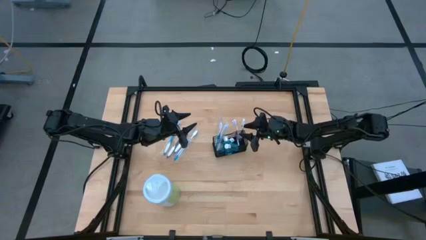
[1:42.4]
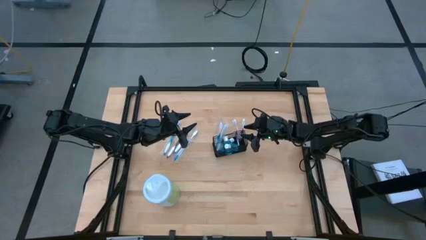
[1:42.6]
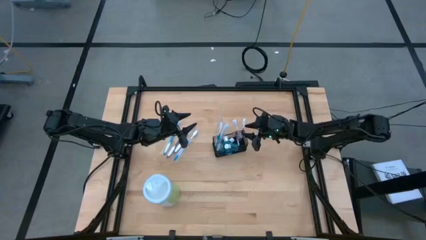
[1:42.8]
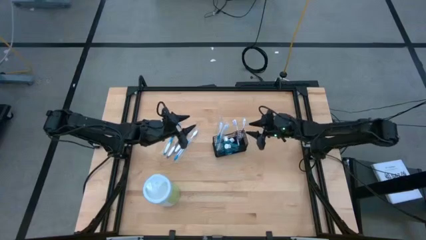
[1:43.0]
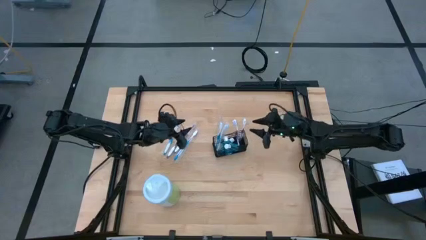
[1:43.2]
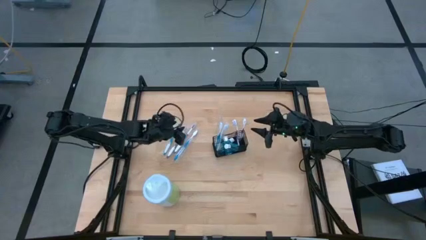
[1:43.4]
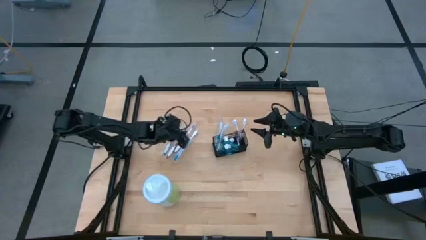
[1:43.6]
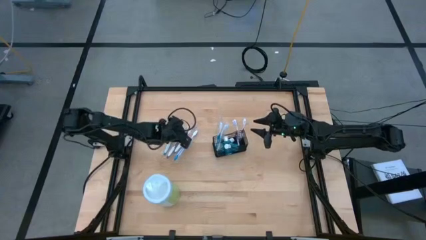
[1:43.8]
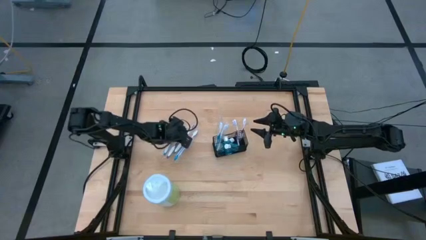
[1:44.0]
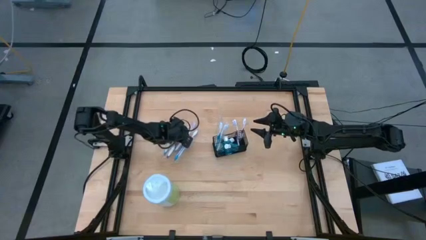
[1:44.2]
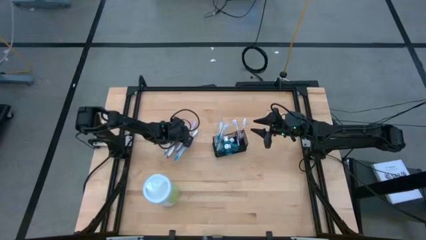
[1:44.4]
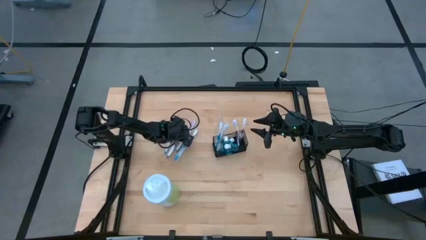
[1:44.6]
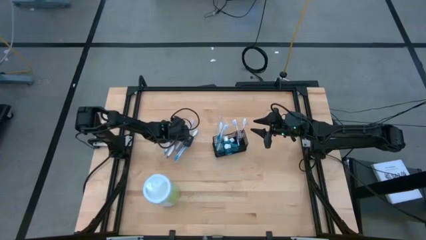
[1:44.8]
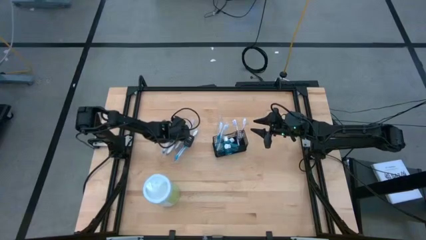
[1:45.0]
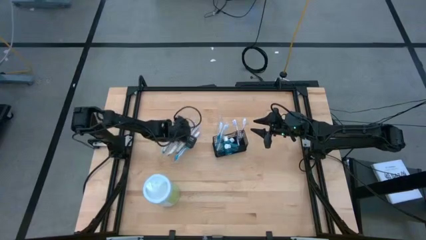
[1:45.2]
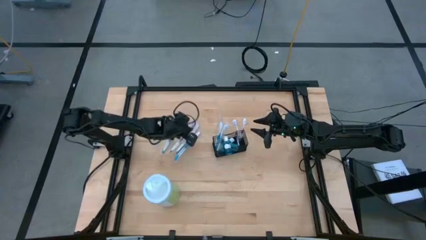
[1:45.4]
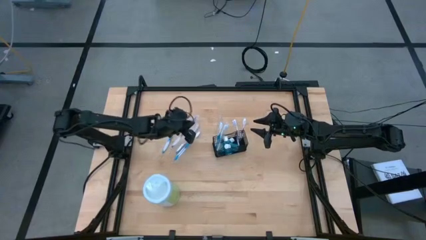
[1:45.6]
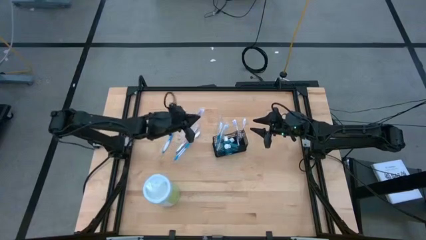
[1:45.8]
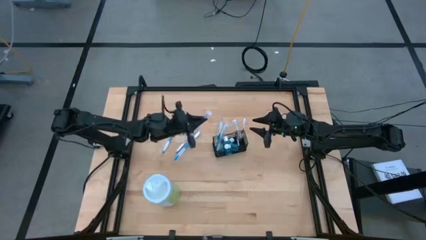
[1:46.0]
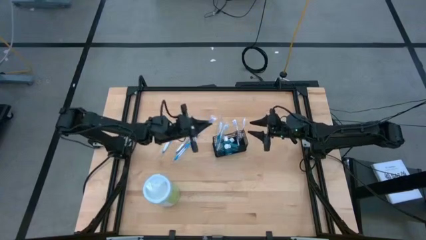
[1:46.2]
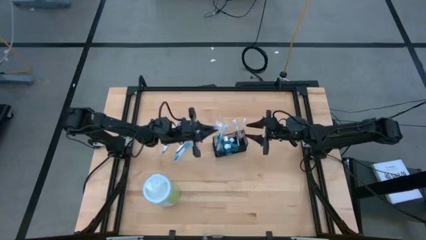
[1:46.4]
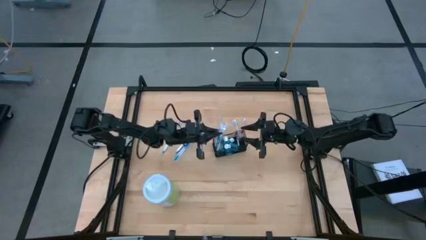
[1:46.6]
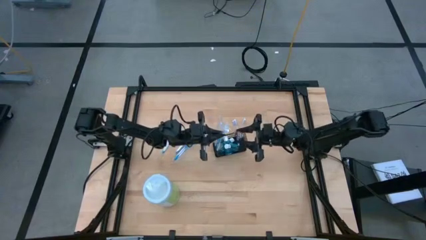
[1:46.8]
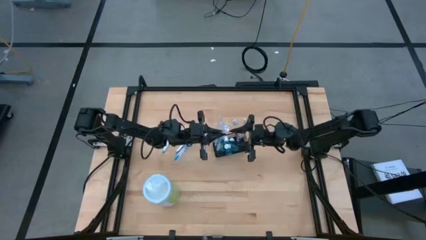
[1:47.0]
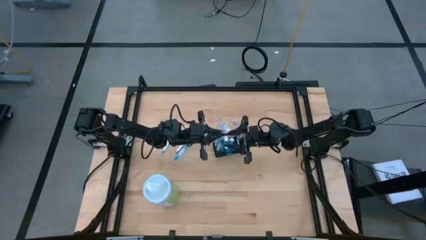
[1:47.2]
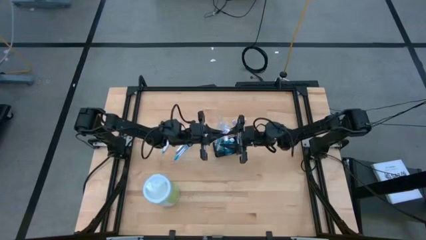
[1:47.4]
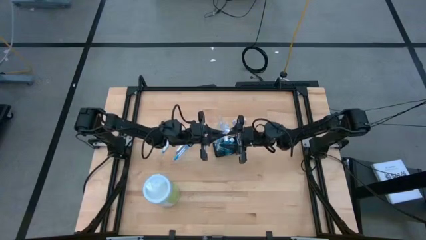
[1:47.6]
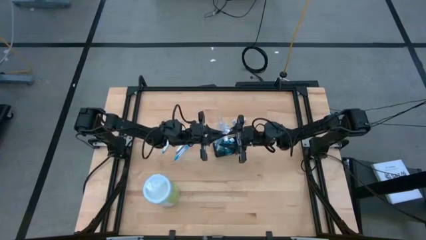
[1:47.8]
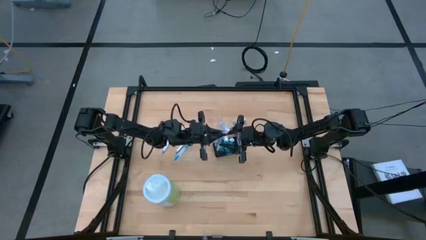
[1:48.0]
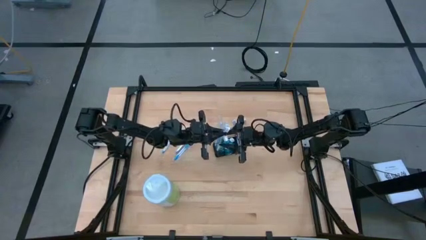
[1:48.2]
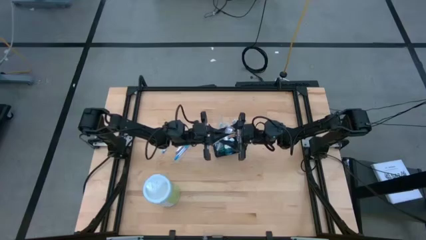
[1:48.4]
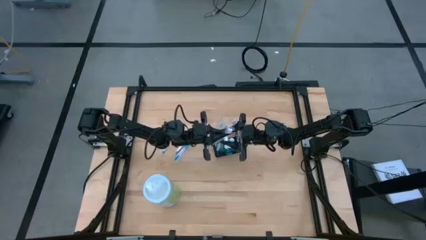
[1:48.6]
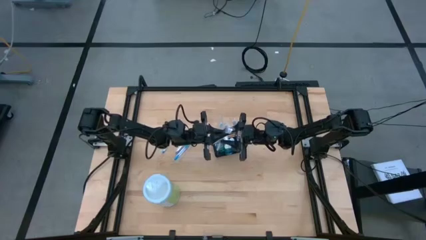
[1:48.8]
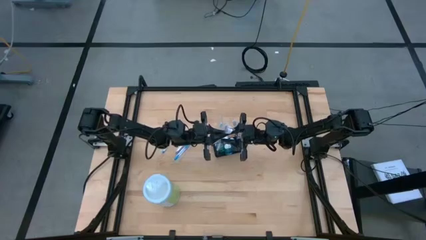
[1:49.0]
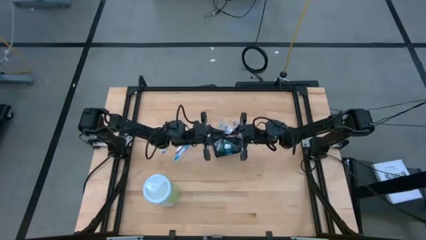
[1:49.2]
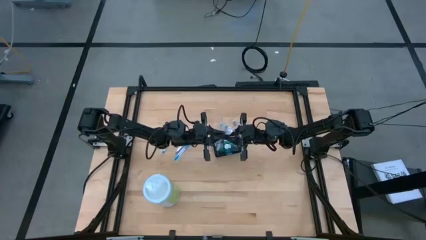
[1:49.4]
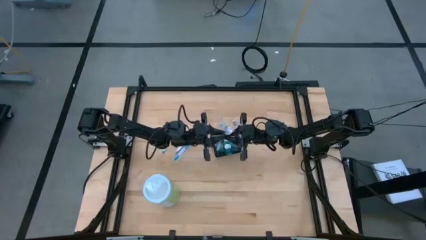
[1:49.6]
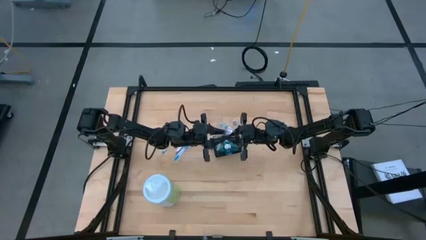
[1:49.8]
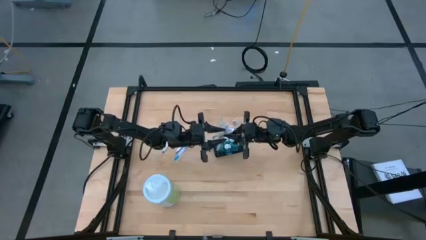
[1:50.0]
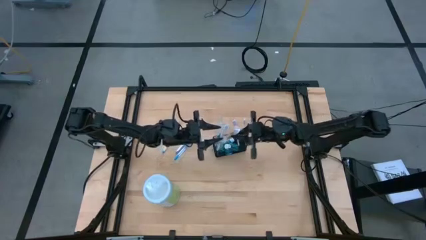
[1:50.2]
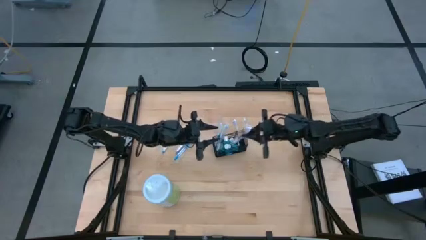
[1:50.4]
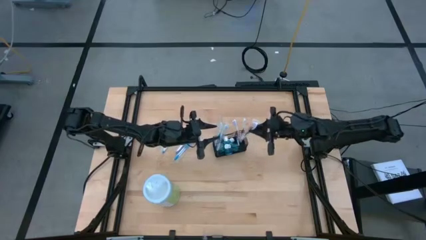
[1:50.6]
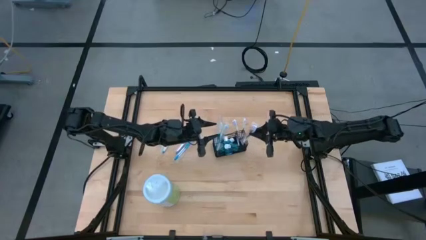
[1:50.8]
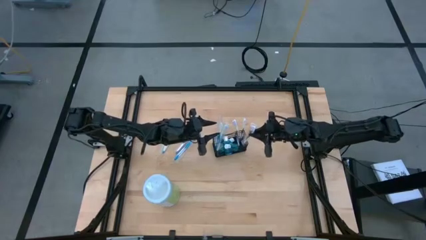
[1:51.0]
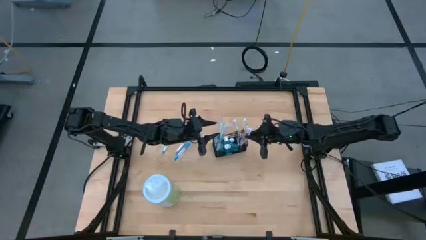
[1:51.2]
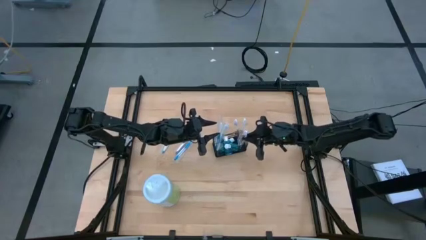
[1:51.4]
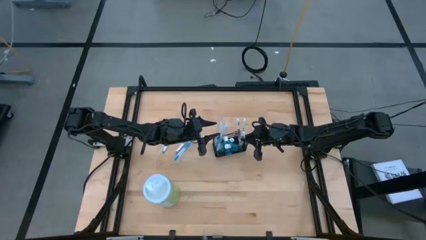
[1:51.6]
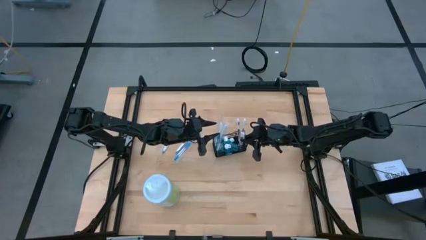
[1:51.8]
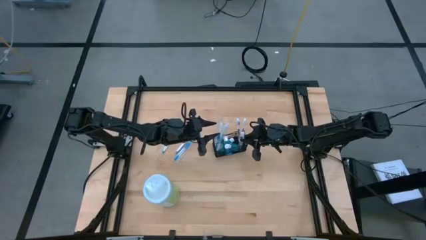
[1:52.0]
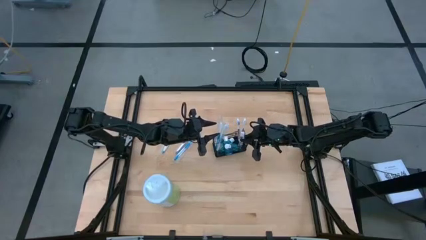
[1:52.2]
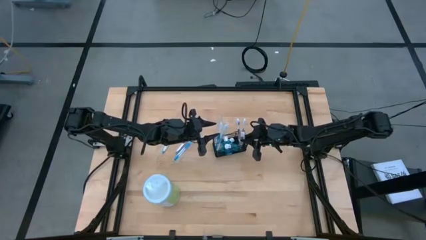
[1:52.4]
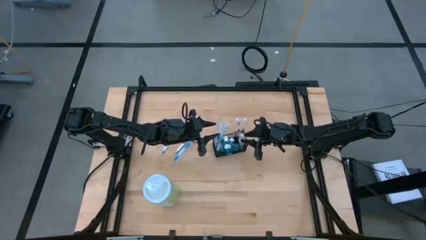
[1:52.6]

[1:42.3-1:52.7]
Task: Pick & Place toothbrushing station
Put the purple toothbrush into the black mesh organizer

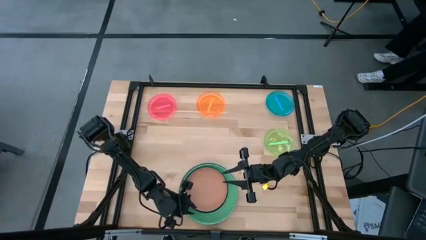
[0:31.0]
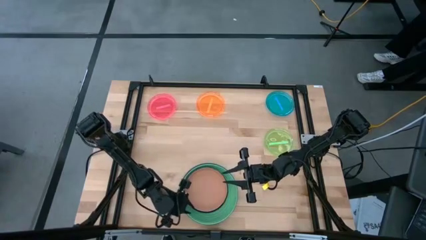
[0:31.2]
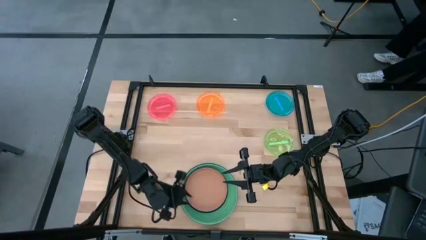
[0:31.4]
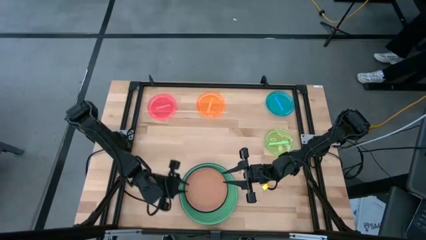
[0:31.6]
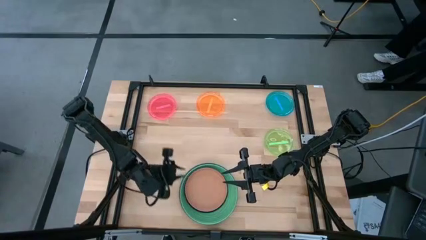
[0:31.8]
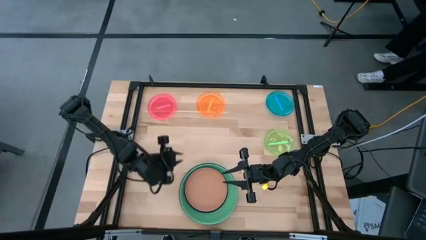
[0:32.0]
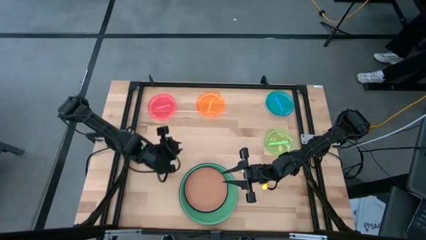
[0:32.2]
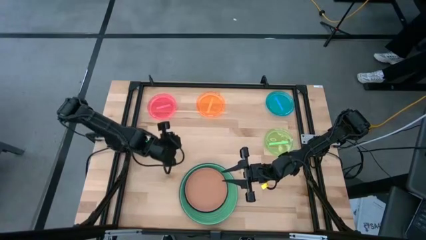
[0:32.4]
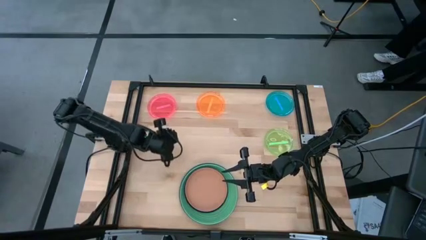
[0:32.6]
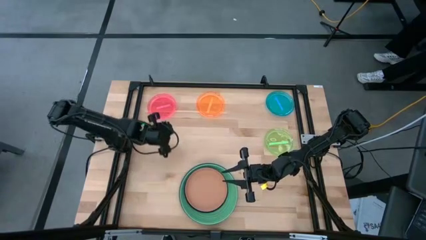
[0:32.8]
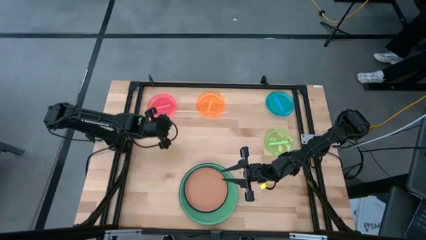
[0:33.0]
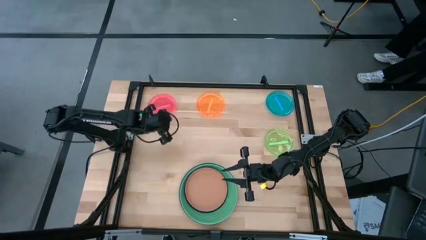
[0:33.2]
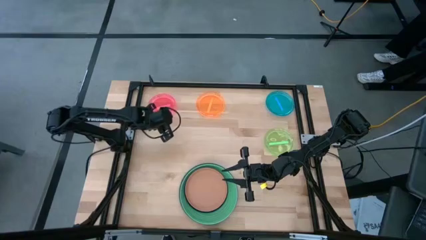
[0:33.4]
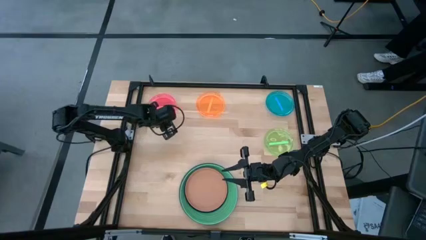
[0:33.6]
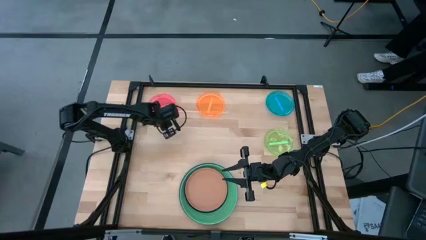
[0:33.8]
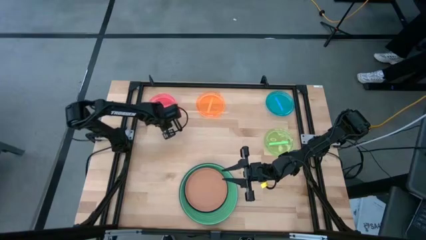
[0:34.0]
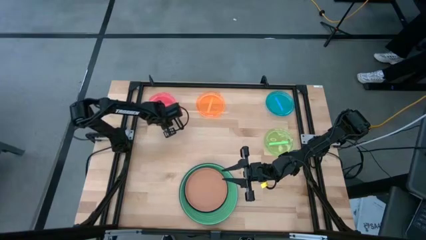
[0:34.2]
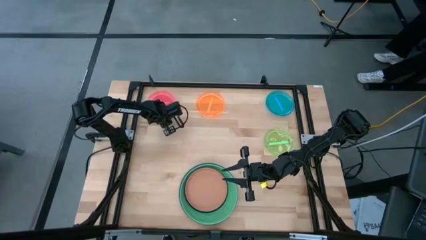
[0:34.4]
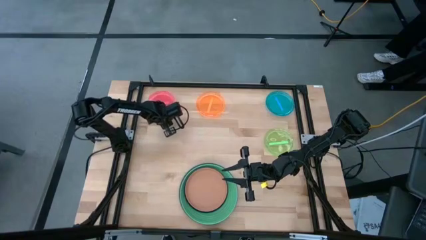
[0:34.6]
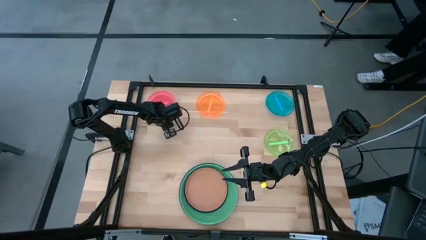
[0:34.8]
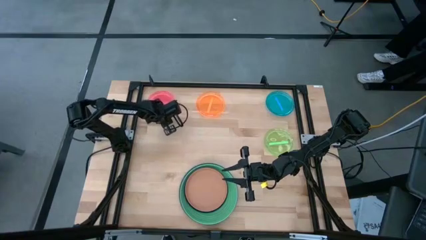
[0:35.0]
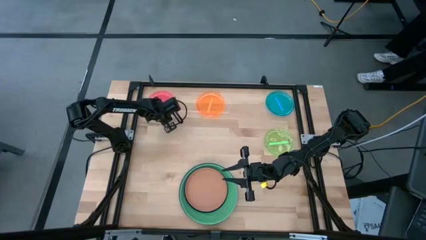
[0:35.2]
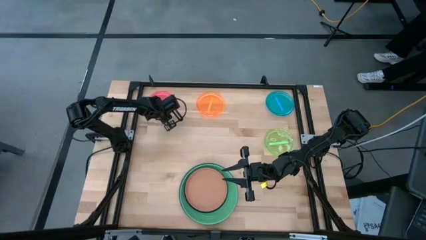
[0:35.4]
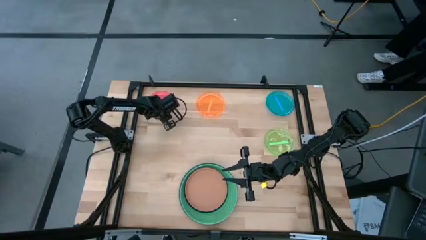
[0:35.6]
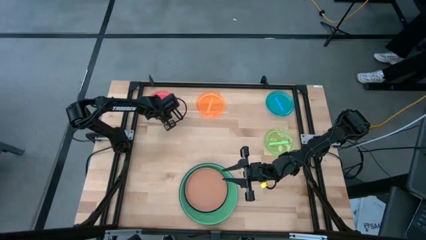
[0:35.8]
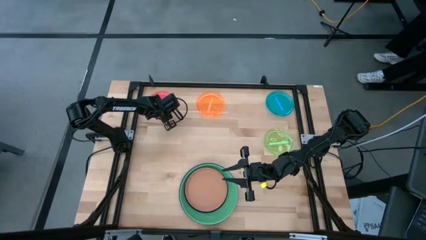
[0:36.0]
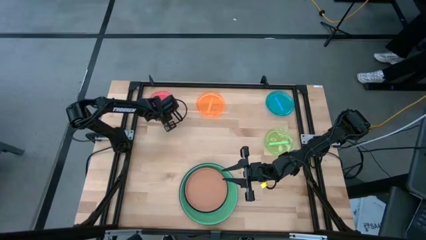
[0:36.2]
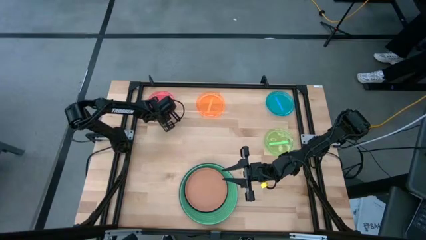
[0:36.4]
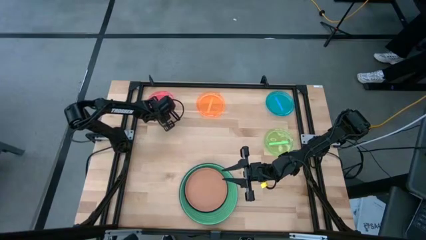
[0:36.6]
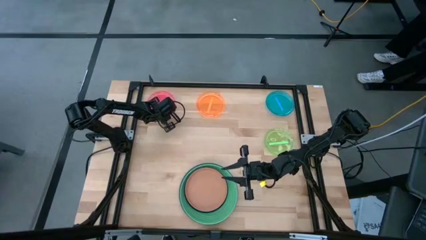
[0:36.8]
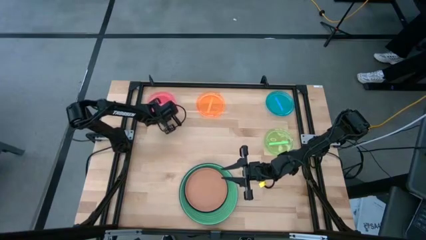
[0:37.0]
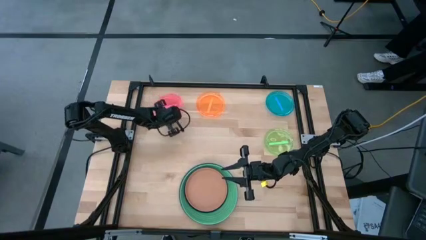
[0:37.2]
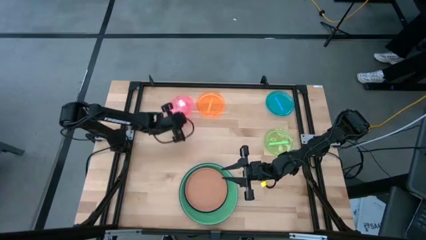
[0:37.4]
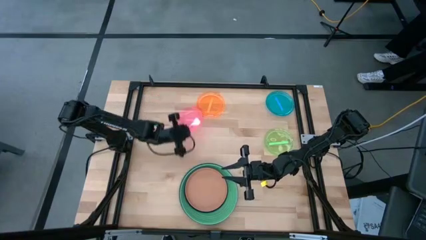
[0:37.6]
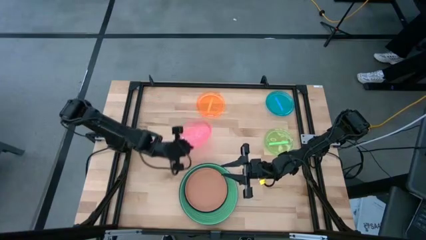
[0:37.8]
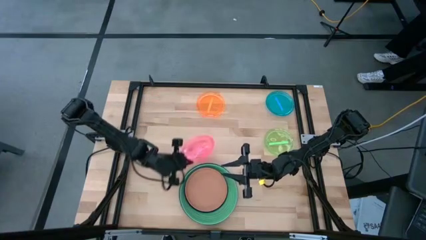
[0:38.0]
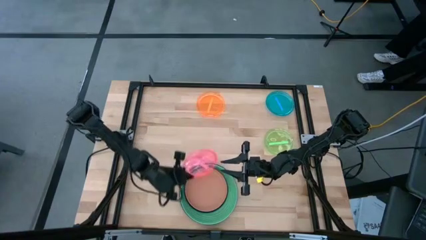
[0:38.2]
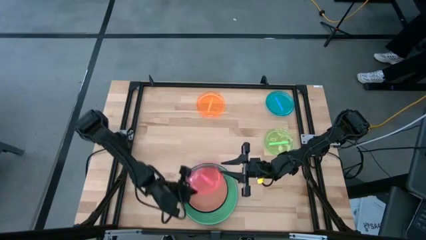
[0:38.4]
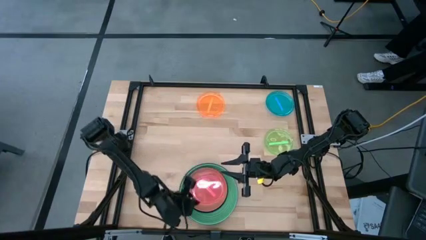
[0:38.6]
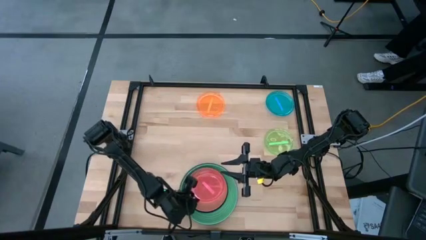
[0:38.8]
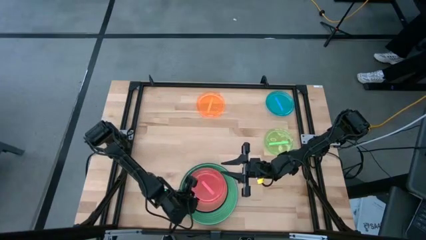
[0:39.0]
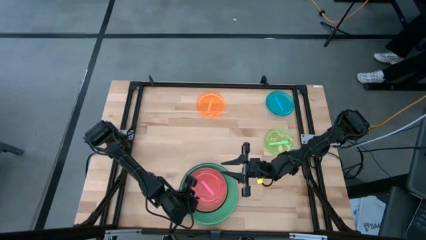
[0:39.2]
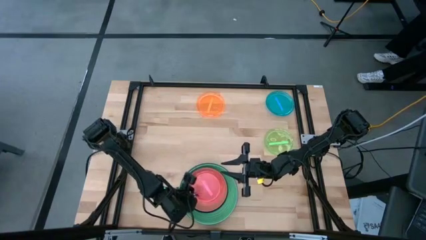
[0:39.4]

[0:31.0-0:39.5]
Task: Stack plastic plates
Stack the pink plate on top of the brown plate
